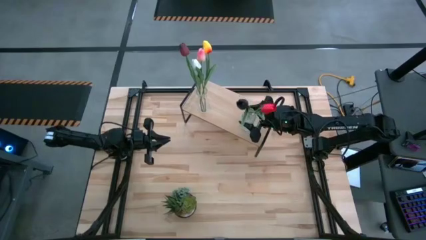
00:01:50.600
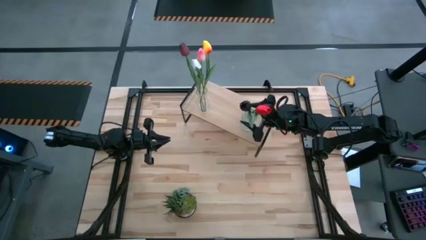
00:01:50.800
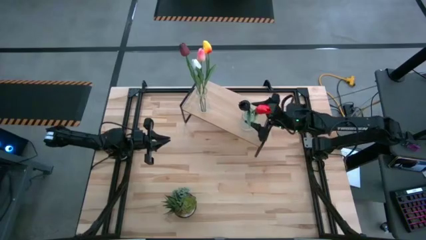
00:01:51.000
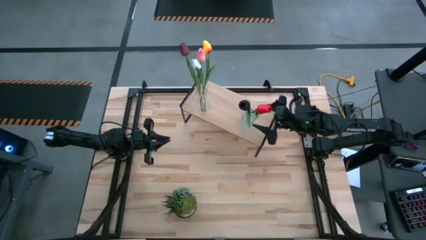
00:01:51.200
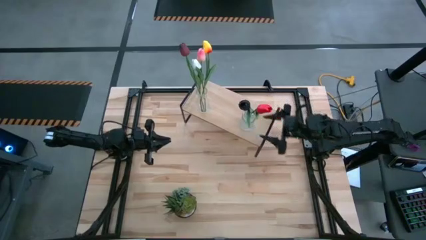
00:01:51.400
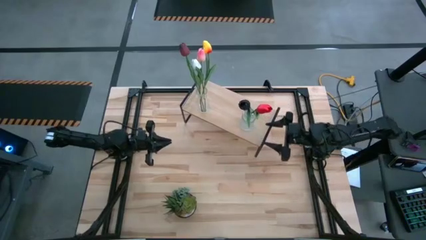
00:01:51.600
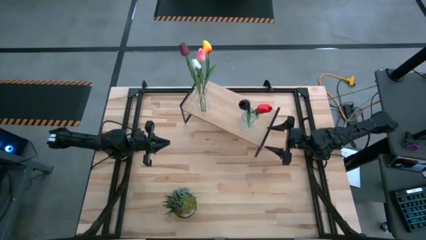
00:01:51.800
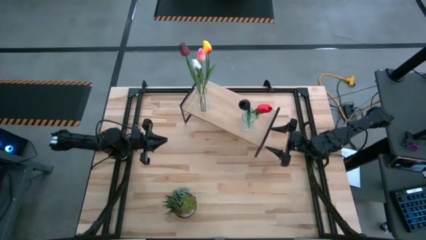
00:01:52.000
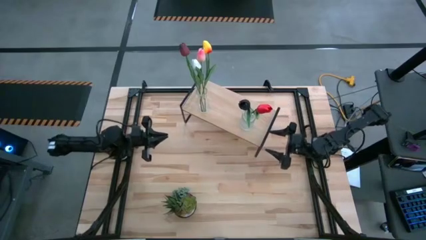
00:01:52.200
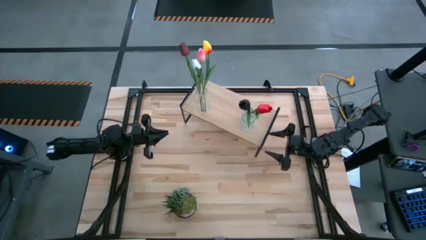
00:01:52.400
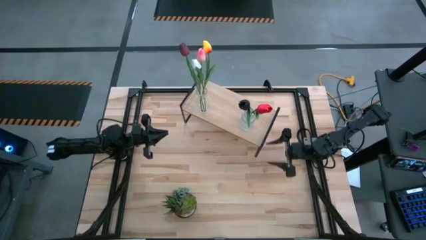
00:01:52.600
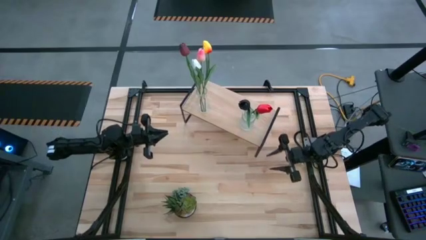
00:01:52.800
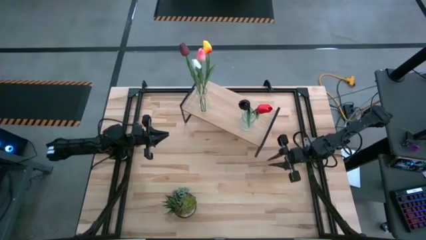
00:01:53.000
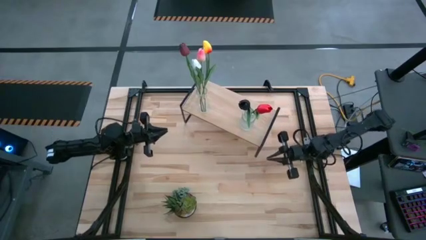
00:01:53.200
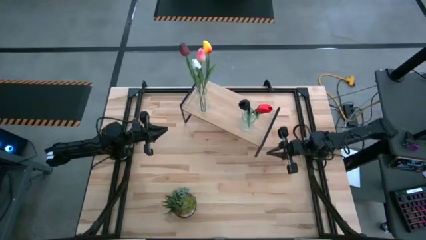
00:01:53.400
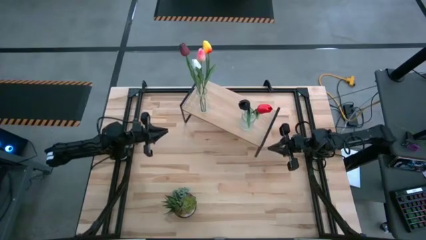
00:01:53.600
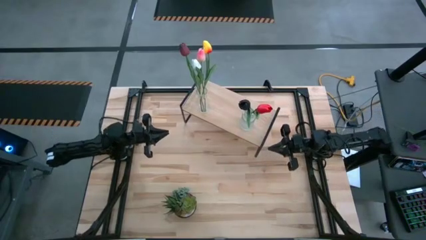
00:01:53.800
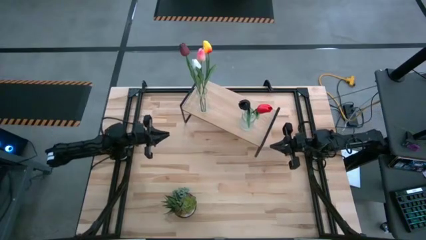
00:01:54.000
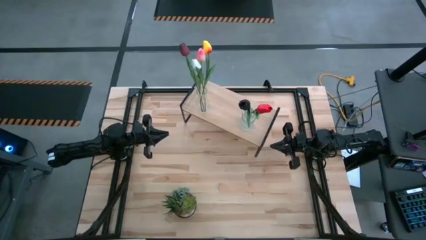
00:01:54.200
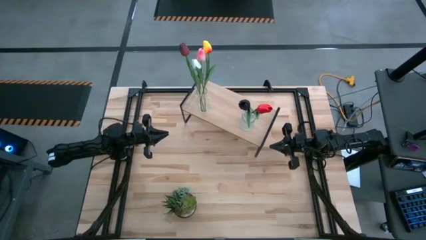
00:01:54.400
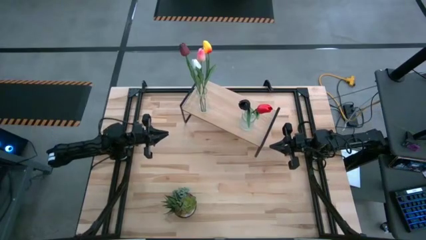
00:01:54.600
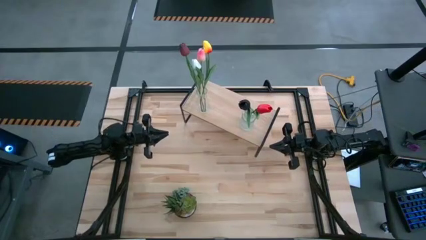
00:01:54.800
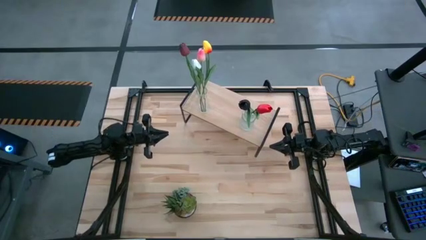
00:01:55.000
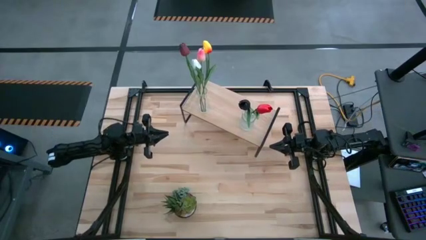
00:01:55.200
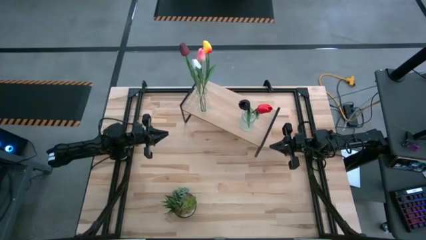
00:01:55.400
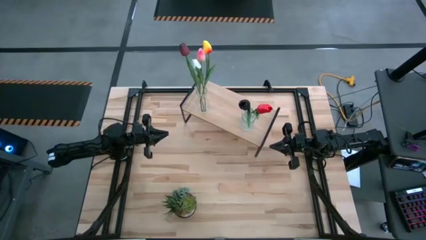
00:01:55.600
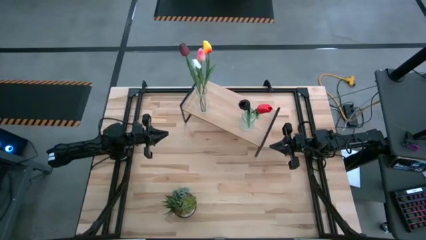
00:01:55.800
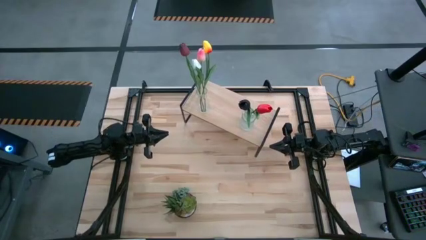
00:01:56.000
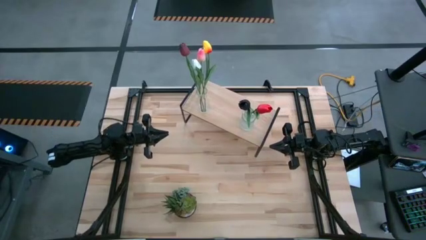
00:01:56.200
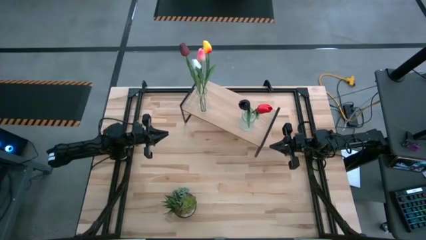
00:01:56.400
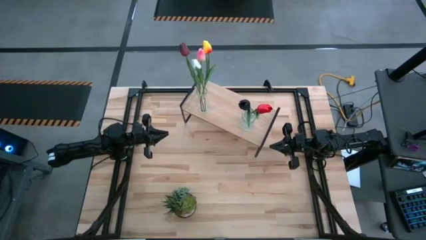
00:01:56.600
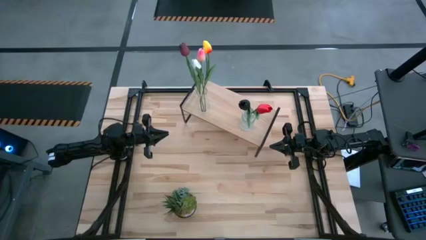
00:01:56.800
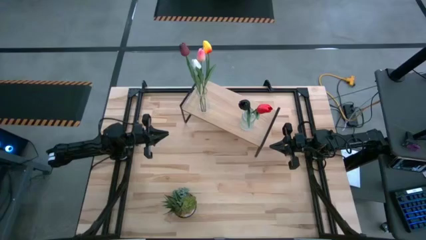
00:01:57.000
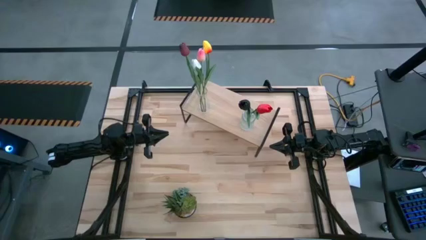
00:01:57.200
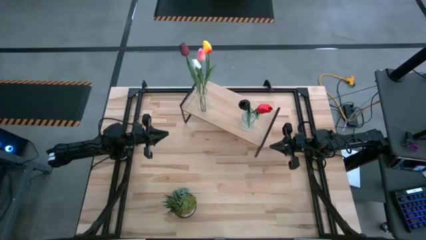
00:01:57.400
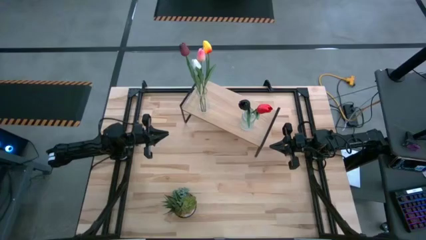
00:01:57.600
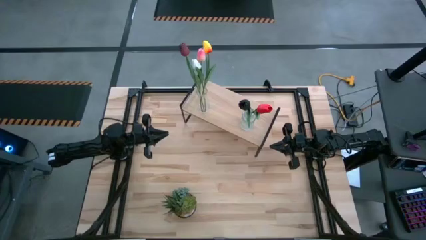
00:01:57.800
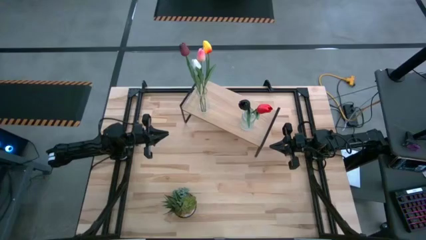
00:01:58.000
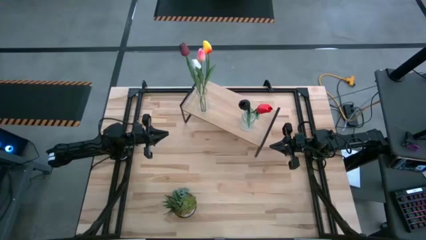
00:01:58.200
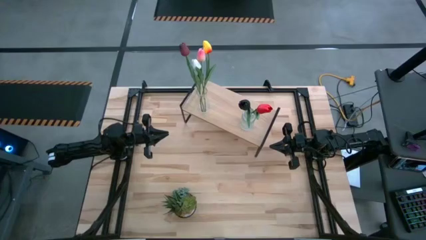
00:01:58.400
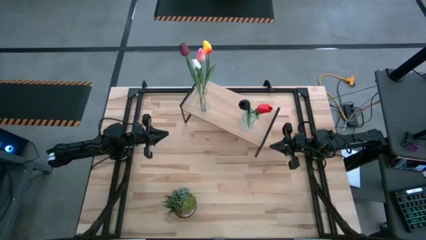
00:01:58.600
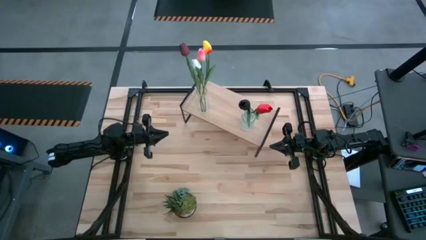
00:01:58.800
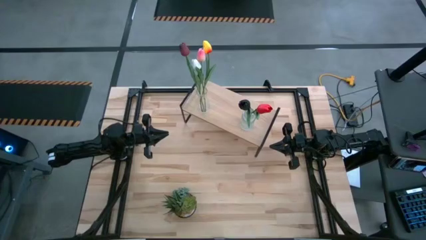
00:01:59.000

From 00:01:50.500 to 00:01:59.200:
Task: Pick and place flowers into a vace then onto a shelf
Return to Home Position

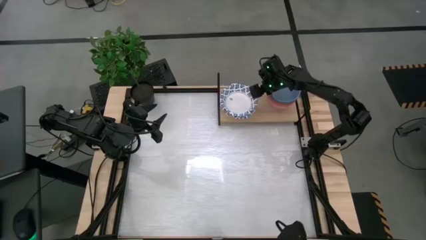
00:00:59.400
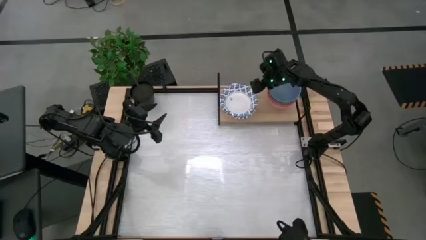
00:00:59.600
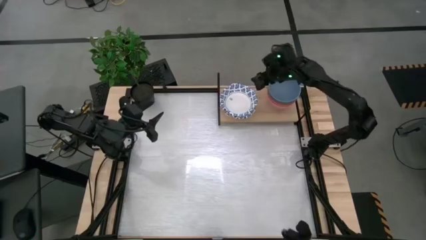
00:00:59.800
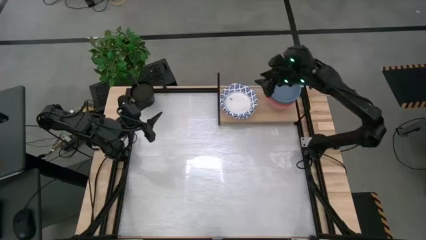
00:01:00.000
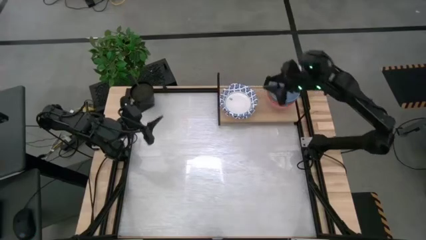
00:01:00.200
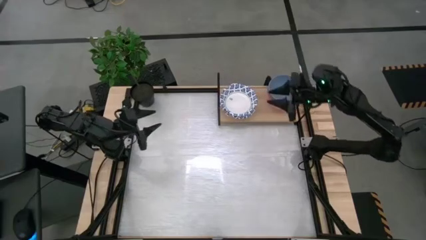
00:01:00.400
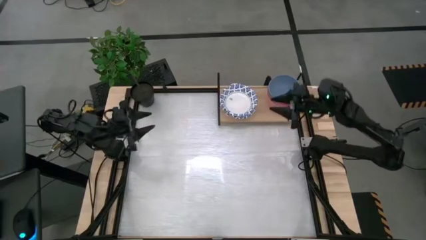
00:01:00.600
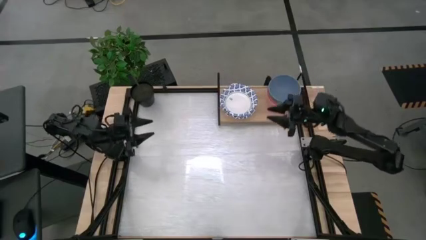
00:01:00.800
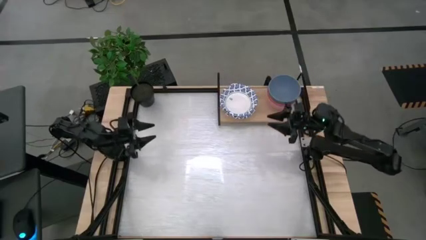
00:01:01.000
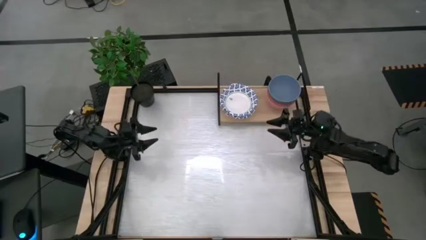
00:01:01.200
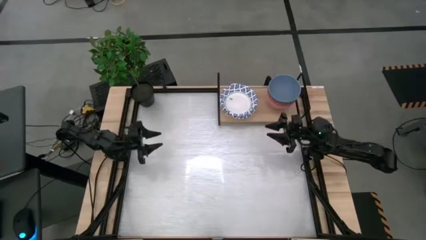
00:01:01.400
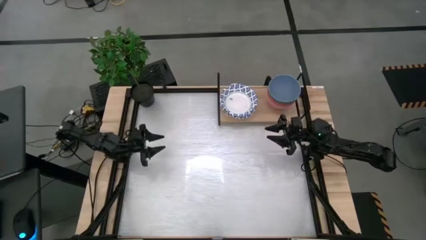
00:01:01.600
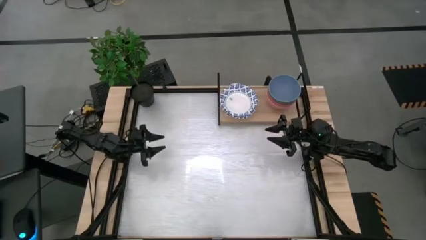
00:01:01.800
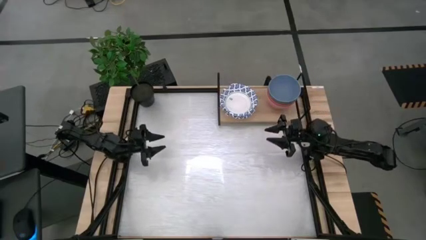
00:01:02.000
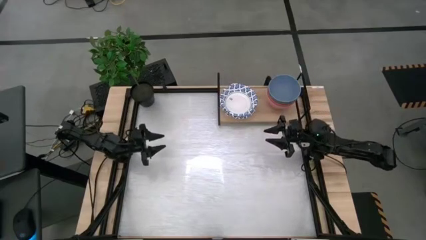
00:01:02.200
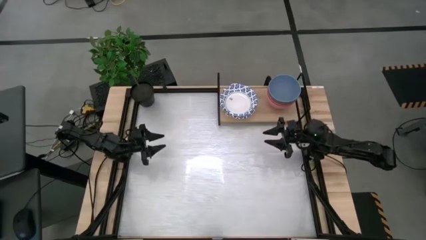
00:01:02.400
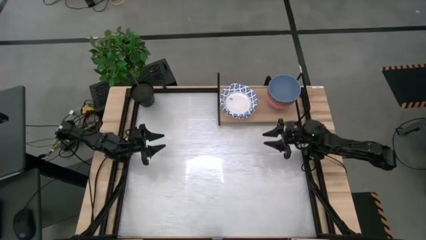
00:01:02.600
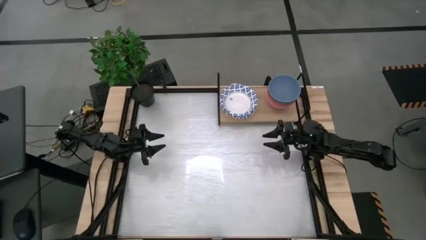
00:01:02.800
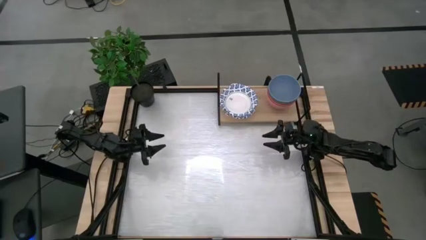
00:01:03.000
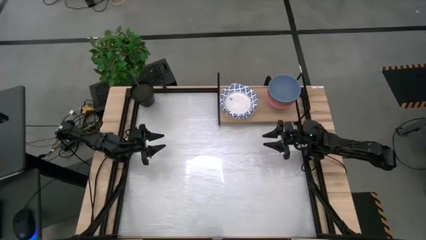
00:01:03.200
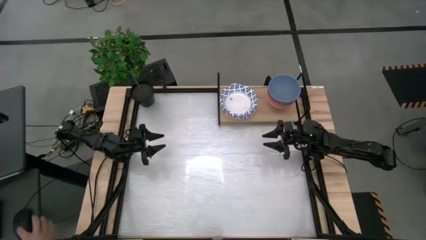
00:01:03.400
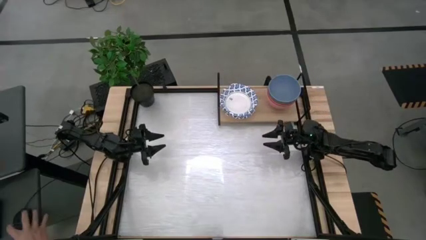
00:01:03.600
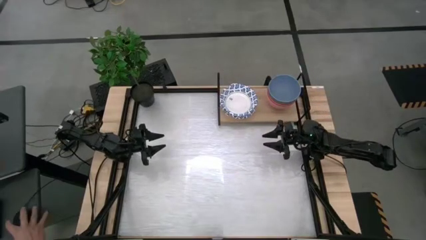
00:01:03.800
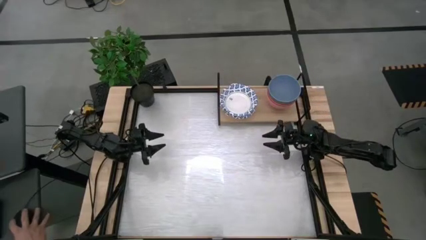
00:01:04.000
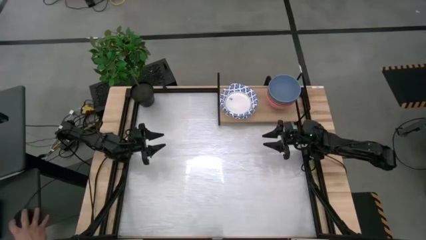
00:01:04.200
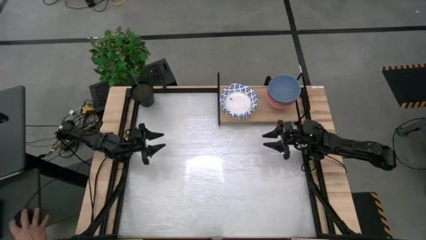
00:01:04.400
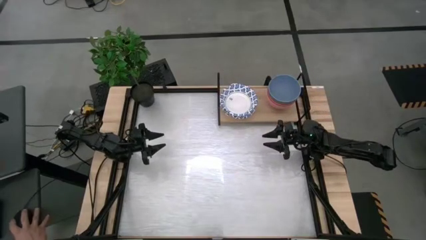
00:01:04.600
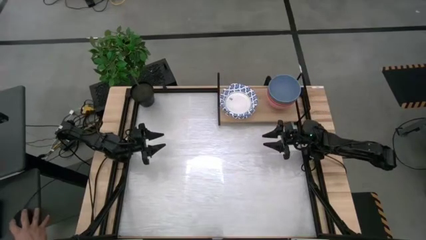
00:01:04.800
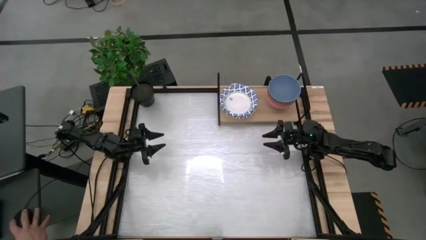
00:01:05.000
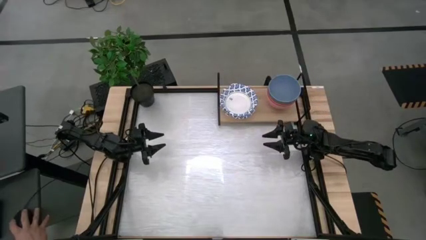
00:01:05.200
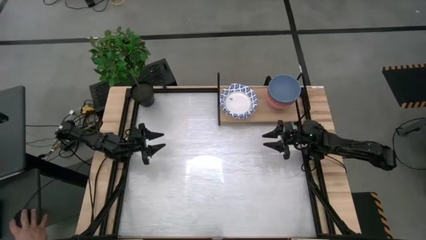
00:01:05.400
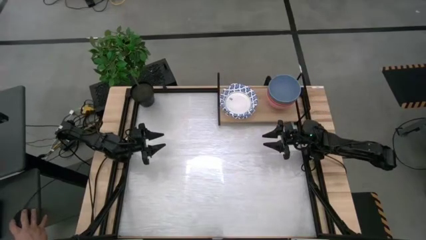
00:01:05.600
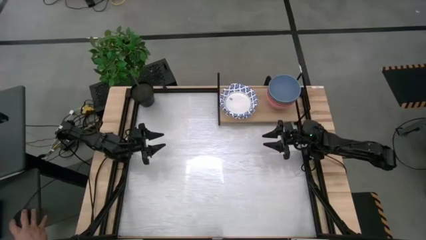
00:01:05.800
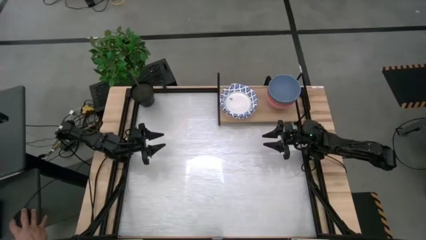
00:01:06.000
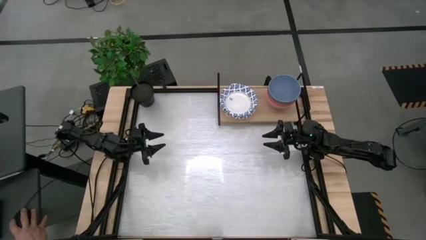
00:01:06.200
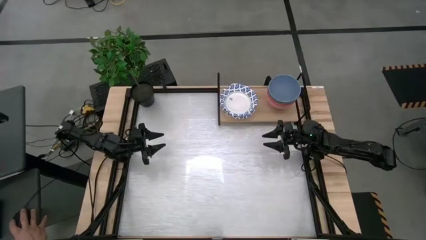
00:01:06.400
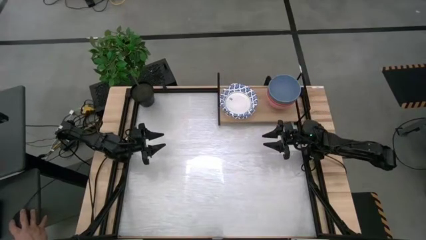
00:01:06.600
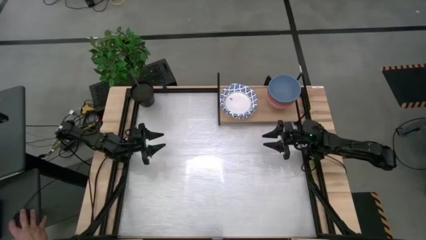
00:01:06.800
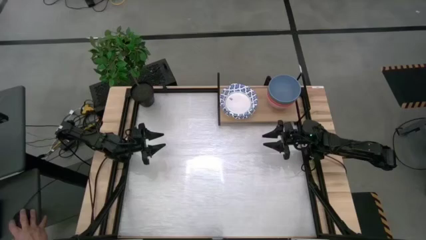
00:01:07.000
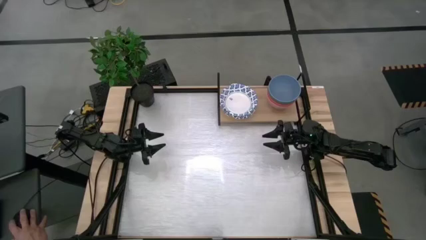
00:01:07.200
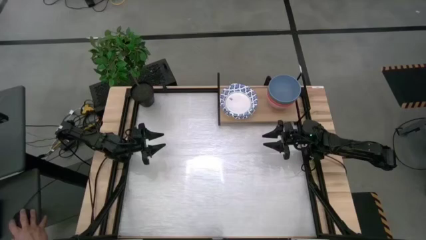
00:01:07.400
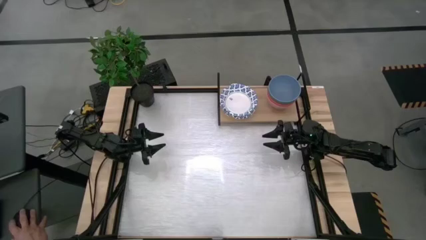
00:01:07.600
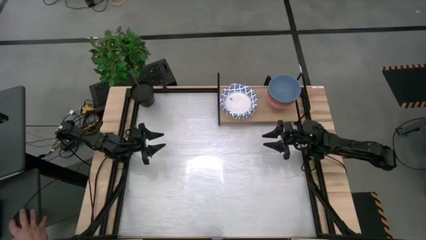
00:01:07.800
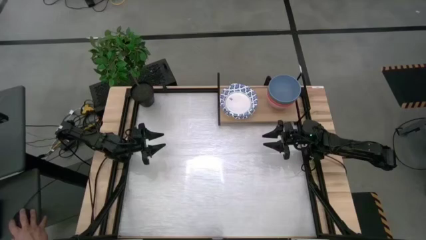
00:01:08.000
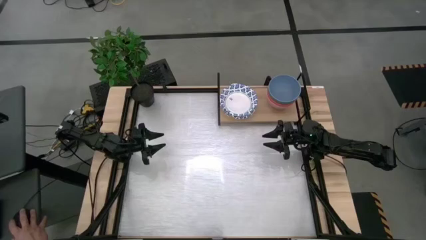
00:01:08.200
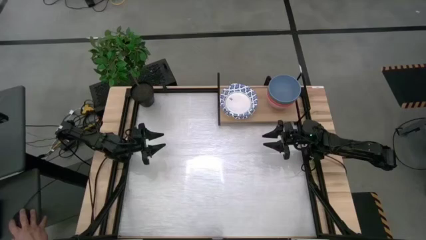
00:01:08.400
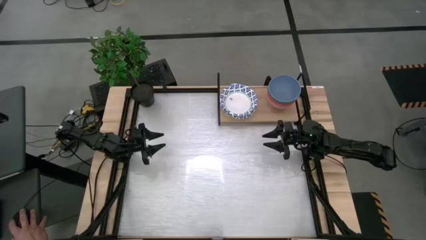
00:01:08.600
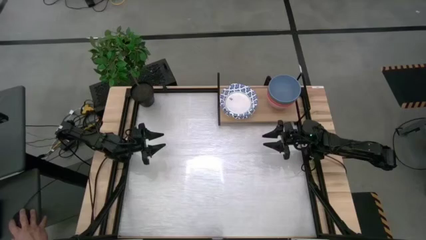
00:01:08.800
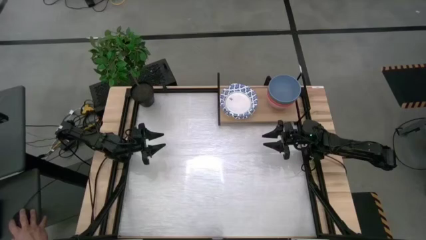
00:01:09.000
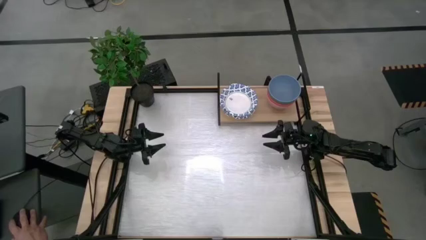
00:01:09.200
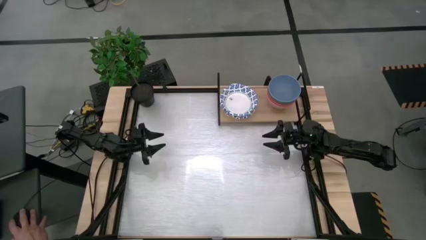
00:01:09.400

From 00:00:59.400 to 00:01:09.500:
Task: Place and stack bowls onto a shelf
Return to Home Position
